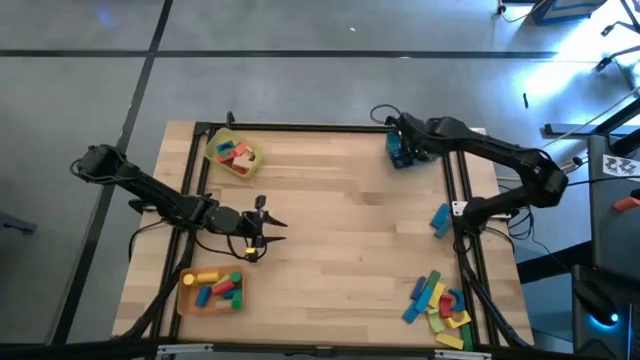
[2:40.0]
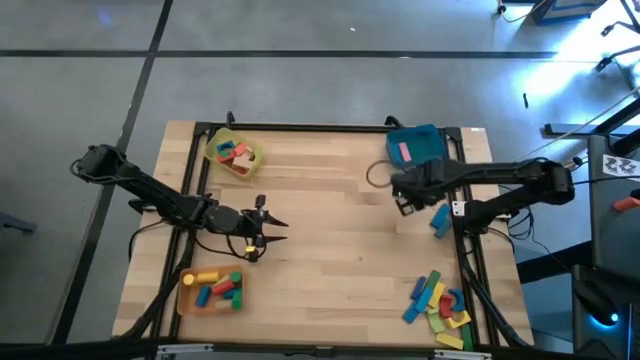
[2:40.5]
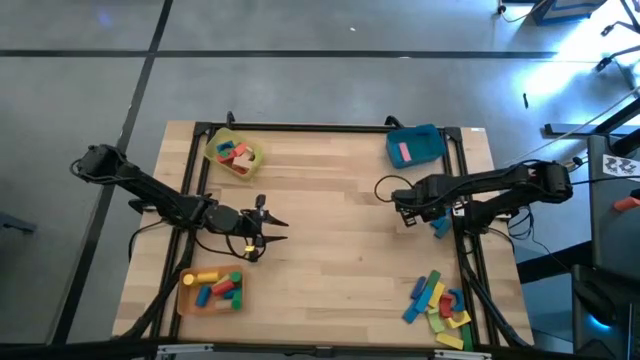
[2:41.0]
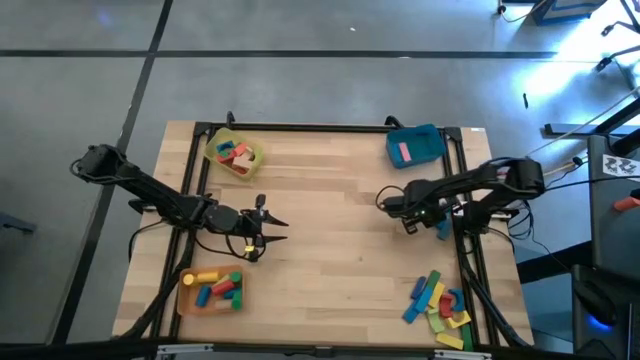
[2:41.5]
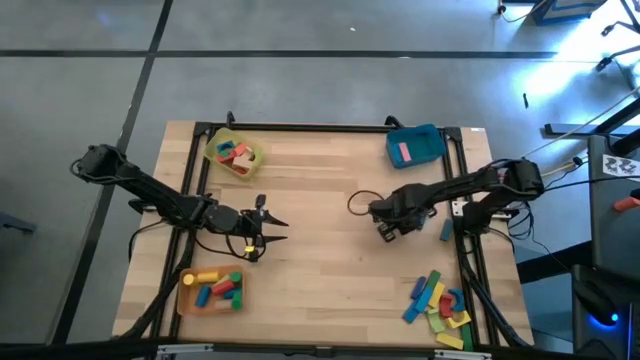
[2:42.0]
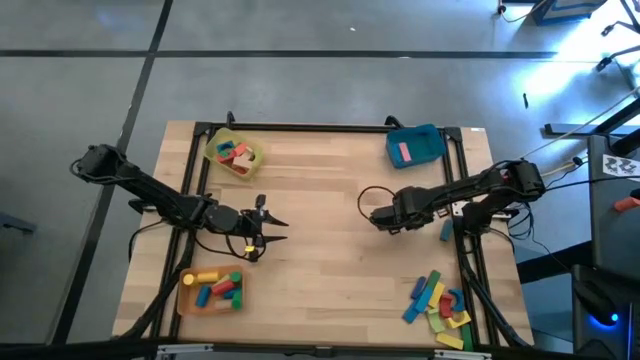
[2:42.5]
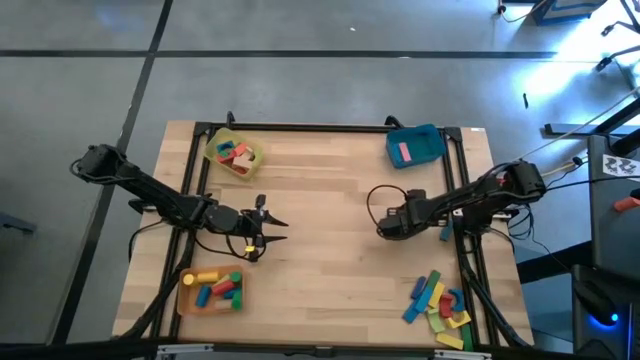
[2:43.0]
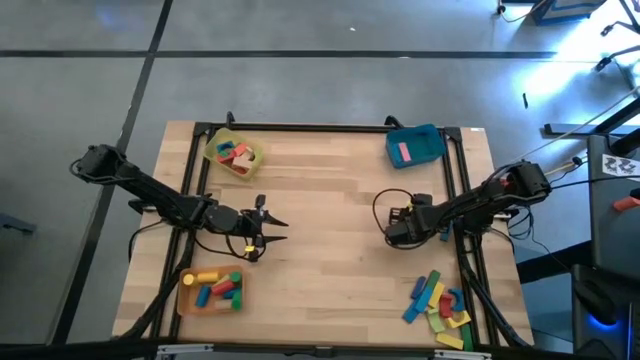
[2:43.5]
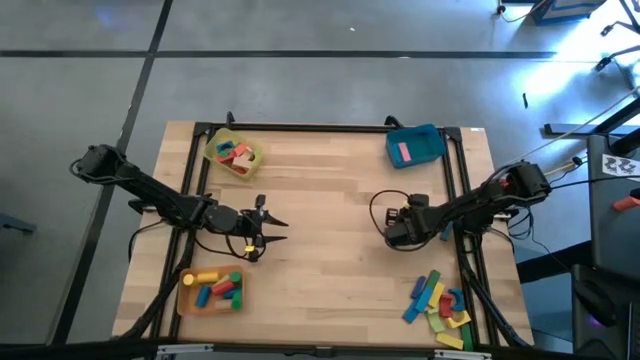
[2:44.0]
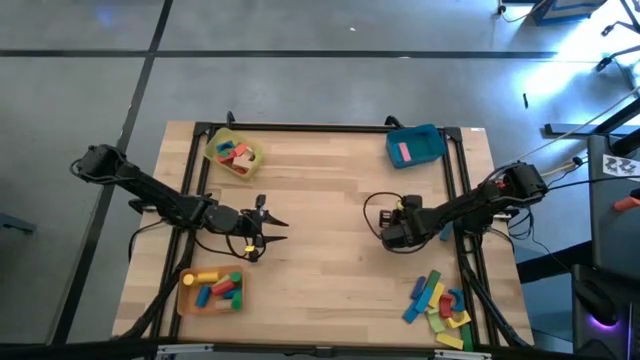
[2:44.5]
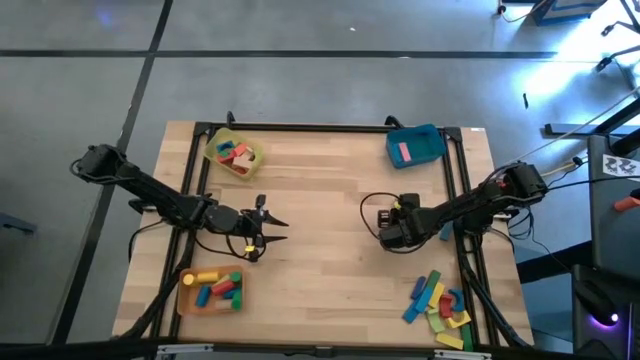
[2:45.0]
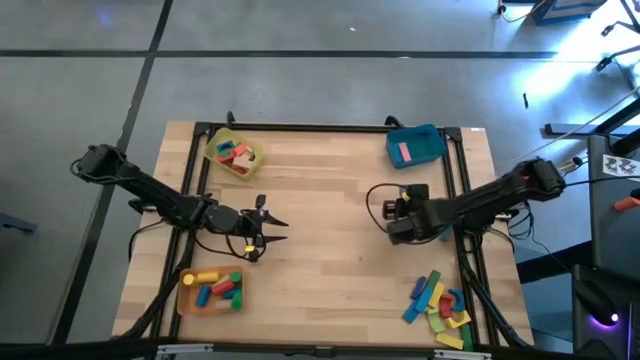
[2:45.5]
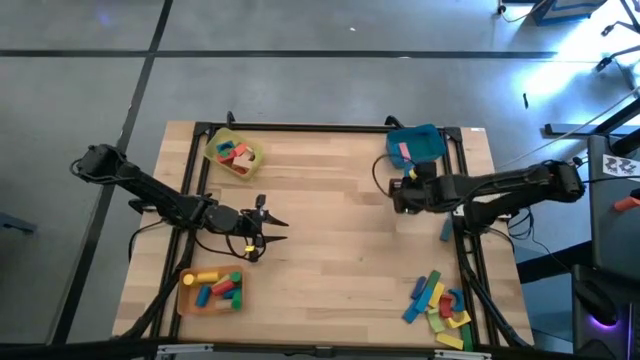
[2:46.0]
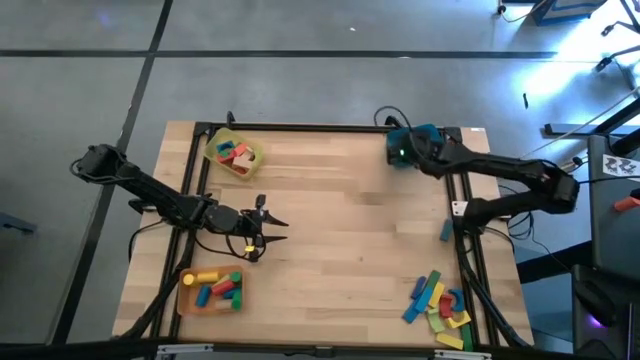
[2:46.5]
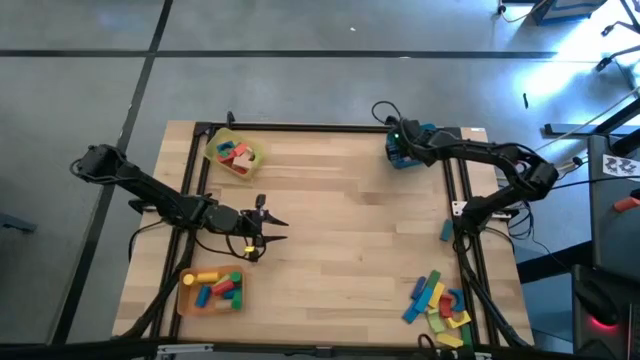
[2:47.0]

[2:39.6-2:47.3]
Task: Sort blocks by size
Put the blue rectangular block into the blue bin

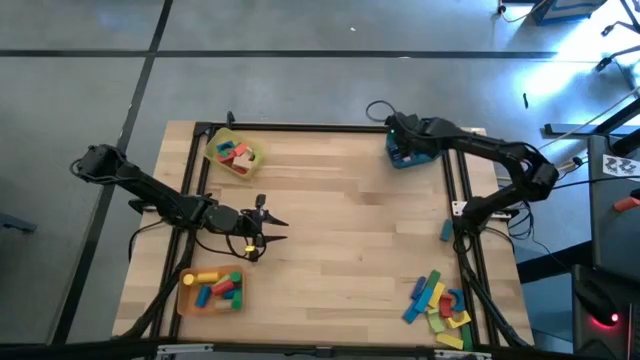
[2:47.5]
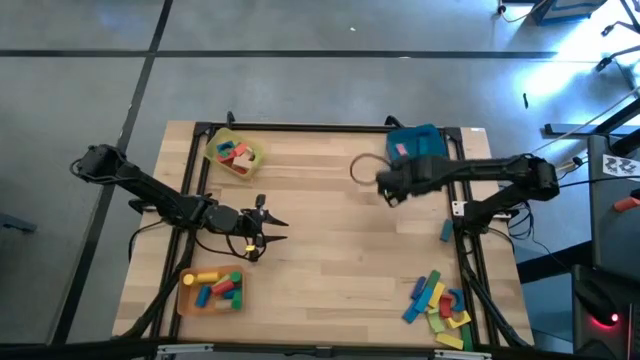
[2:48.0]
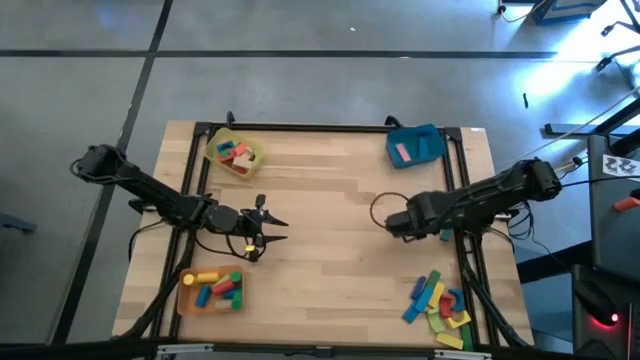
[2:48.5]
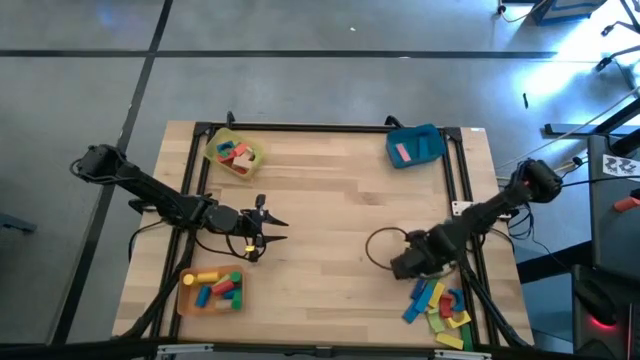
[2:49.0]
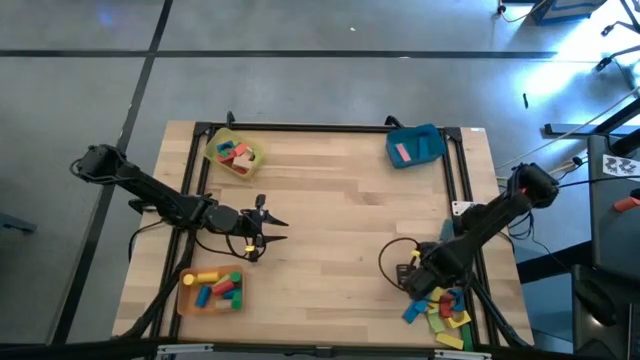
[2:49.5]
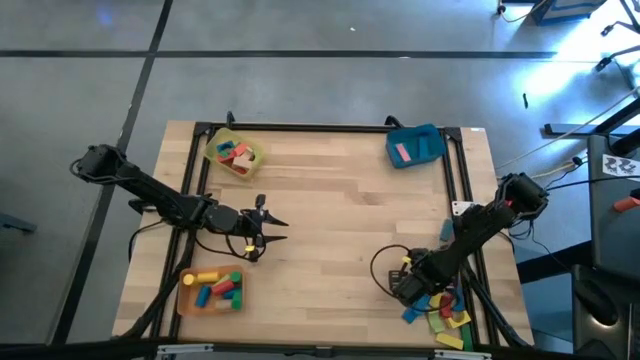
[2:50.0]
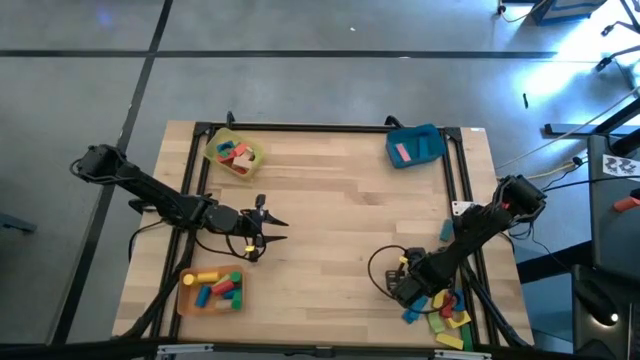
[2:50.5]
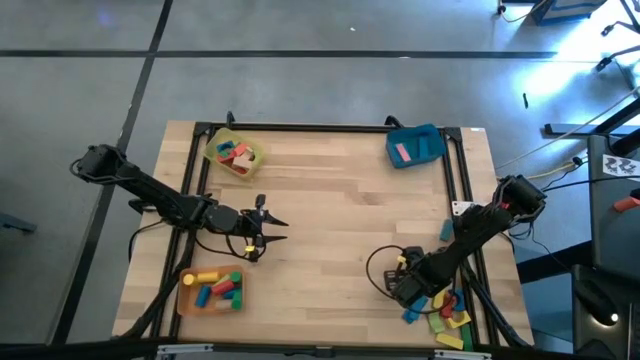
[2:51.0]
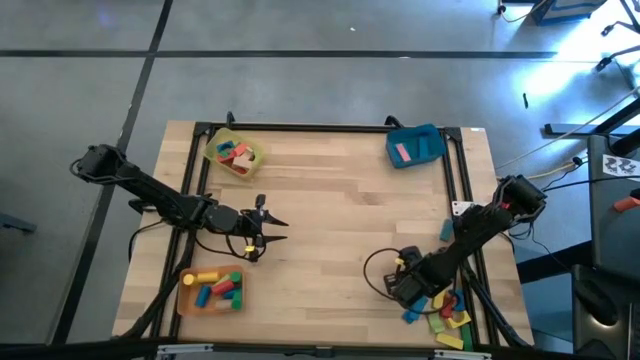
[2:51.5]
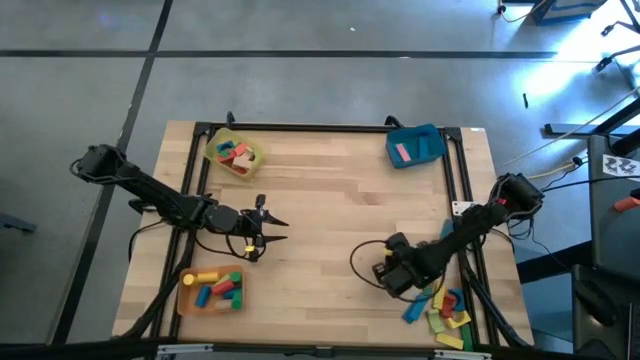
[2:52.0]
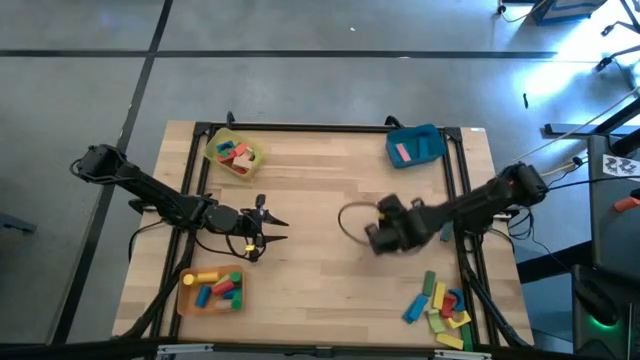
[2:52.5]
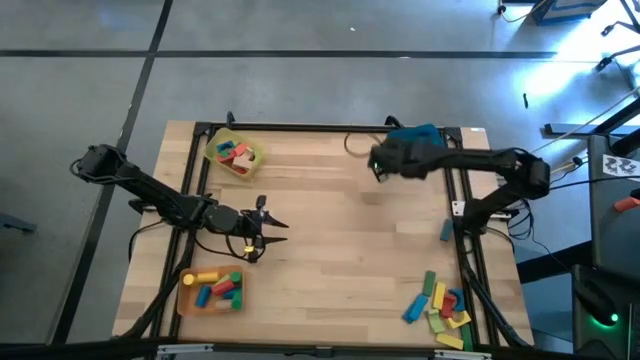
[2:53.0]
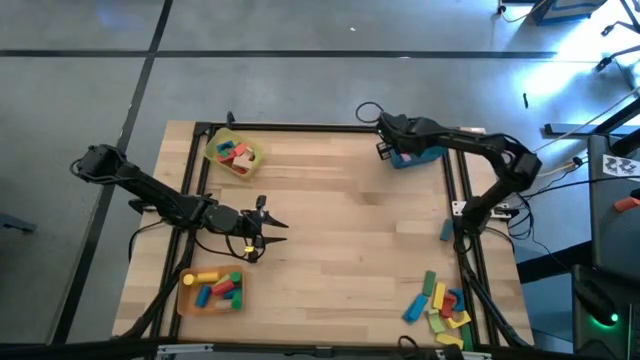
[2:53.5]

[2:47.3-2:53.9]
Put the dark blue rectangular block into the blue bin

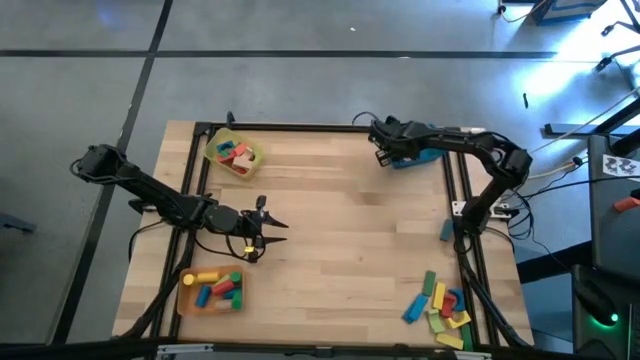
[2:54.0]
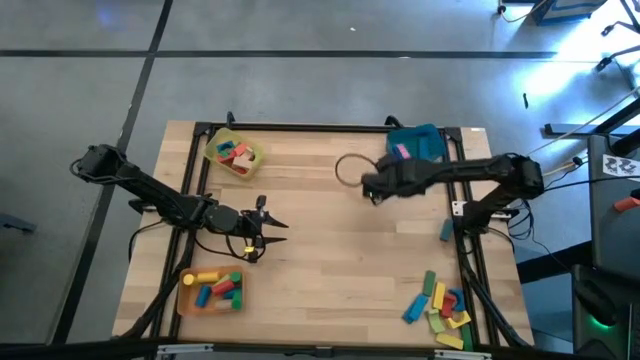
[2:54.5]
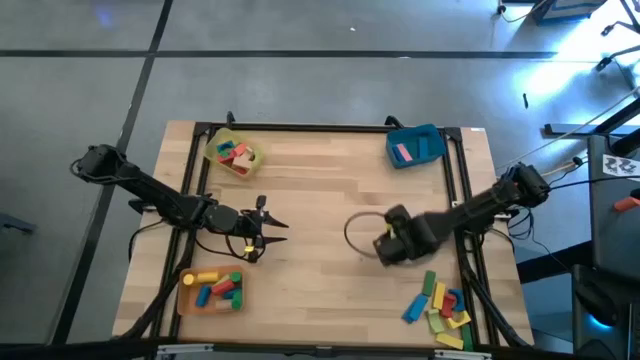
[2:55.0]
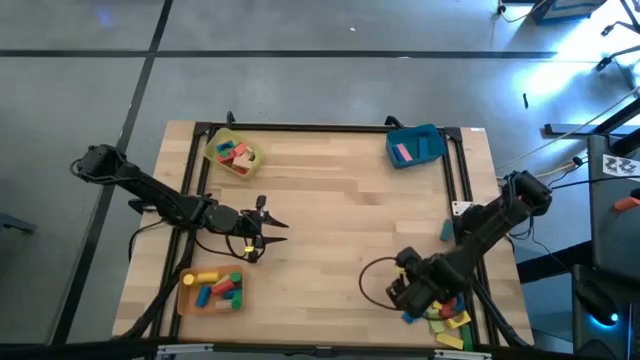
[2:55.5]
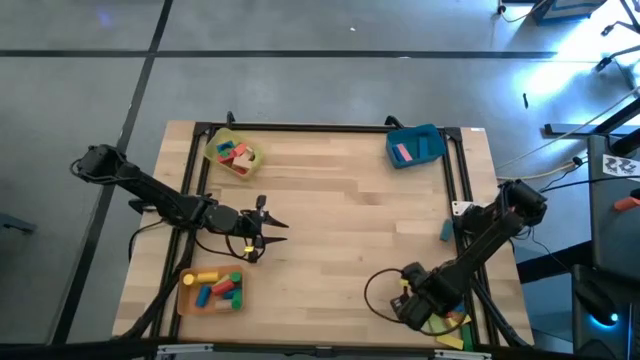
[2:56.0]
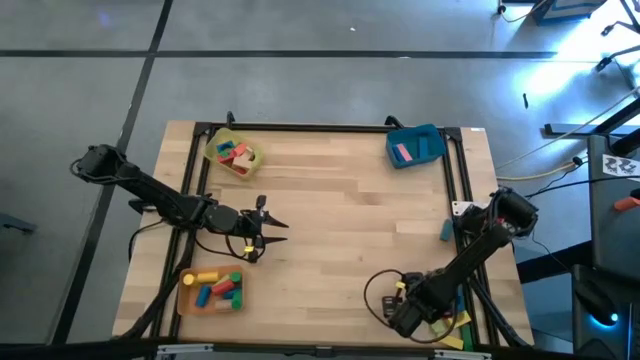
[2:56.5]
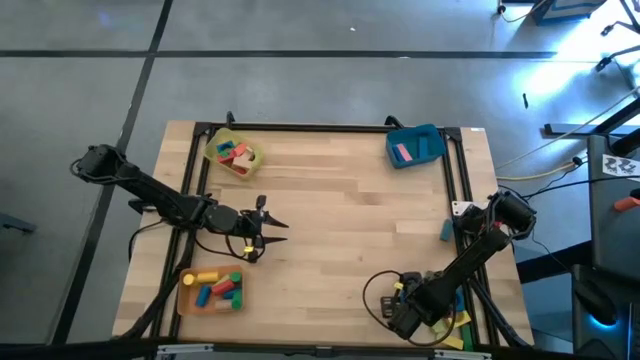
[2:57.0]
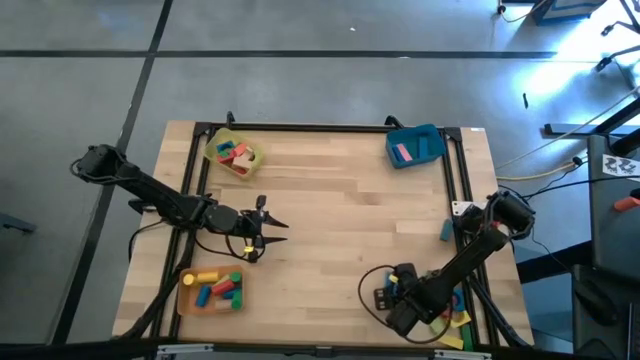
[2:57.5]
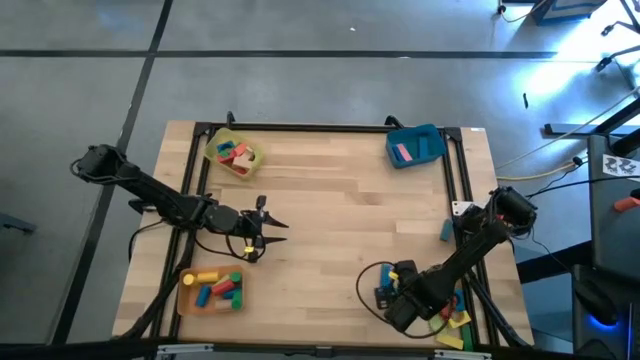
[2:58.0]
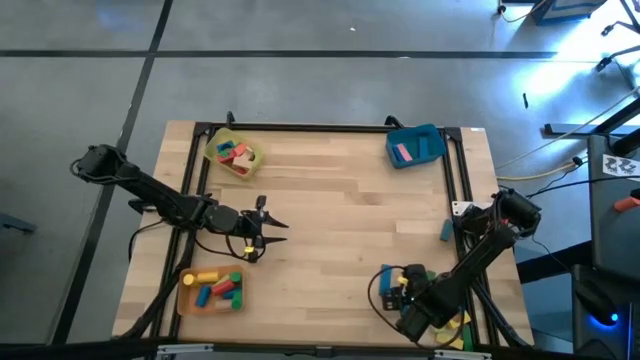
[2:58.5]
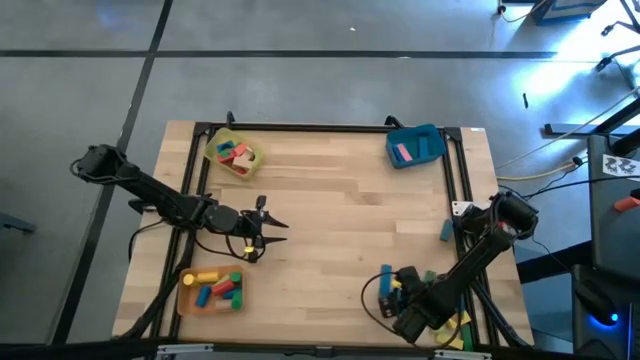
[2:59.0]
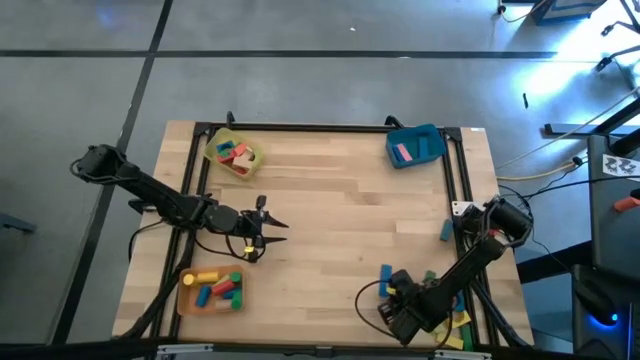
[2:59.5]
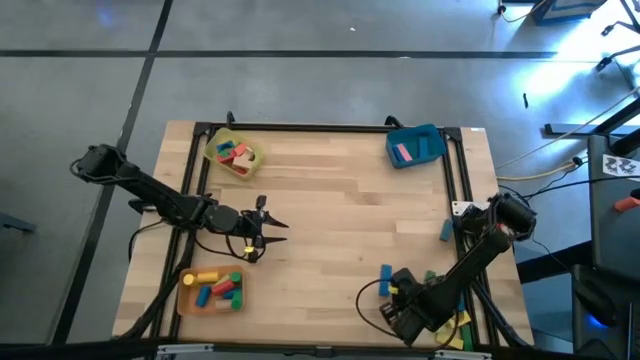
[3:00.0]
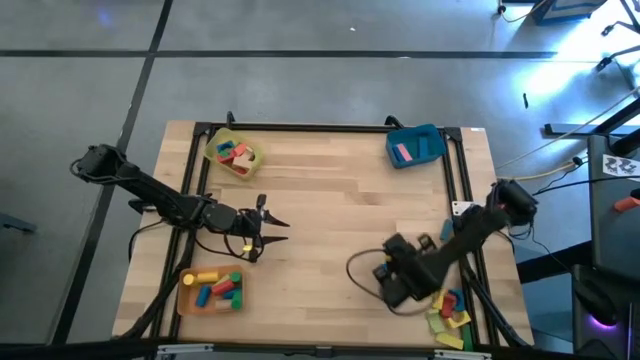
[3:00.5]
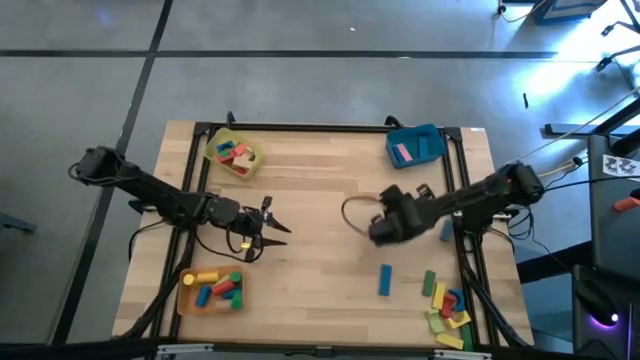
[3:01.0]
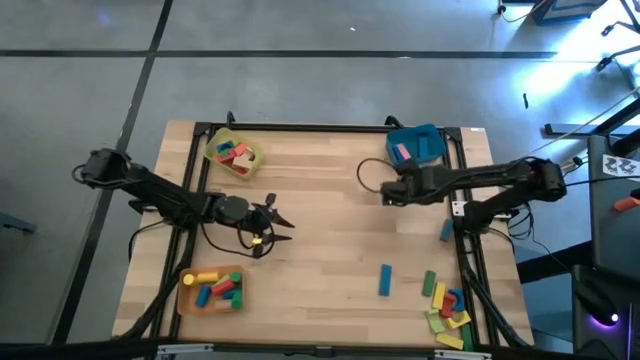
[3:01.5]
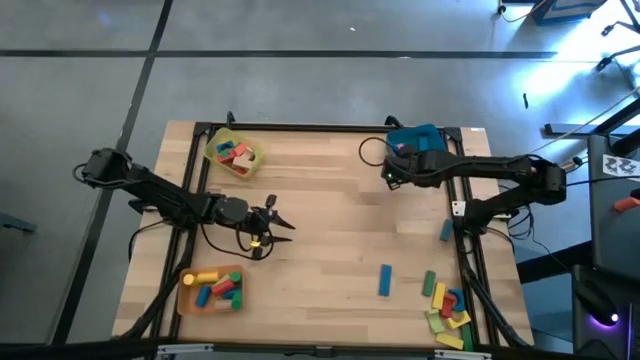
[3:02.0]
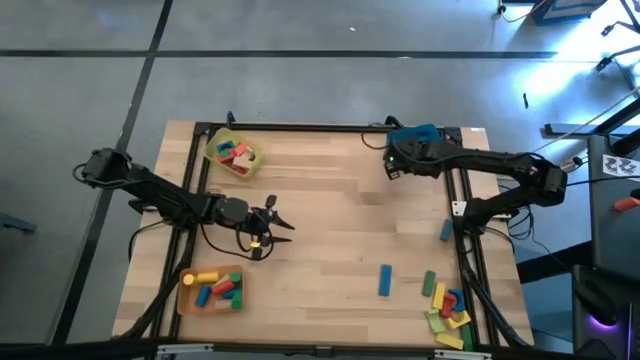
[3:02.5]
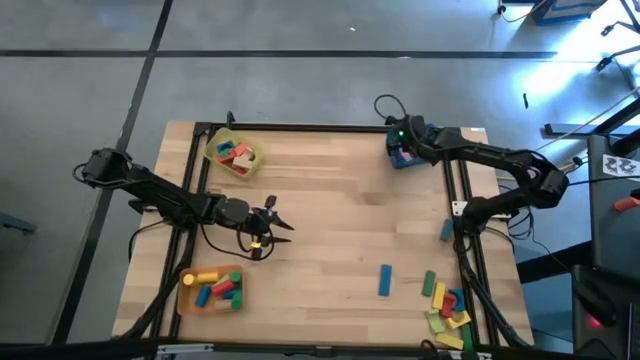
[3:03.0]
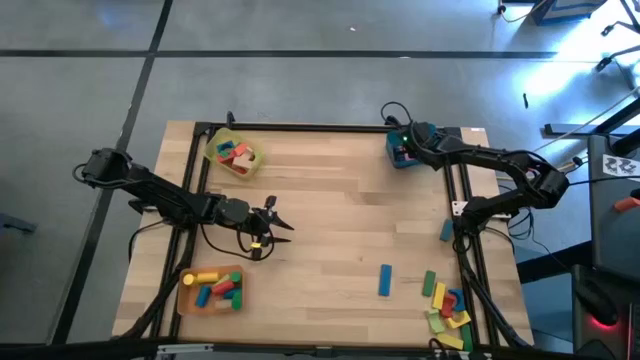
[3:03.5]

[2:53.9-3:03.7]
Put the blue rectangular block into the blue bin
